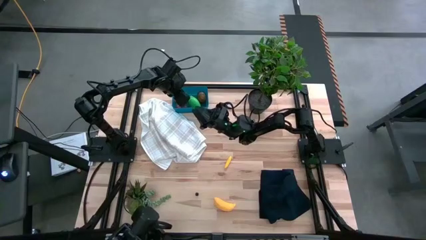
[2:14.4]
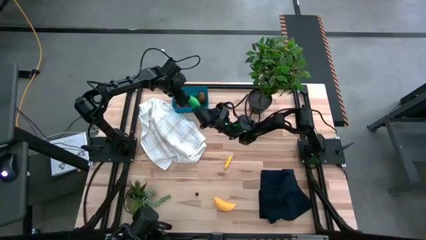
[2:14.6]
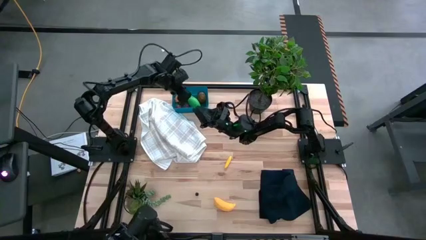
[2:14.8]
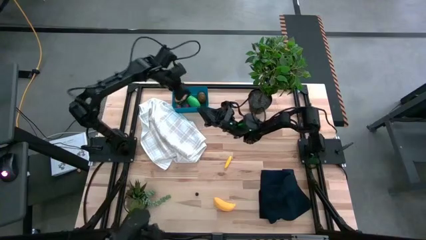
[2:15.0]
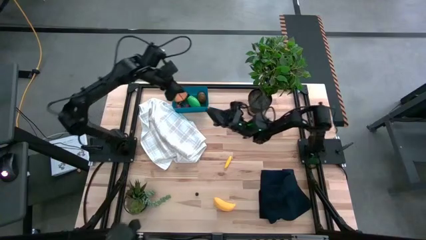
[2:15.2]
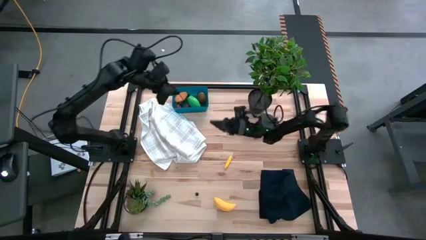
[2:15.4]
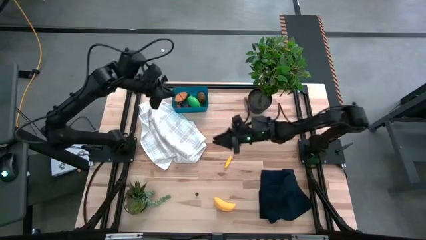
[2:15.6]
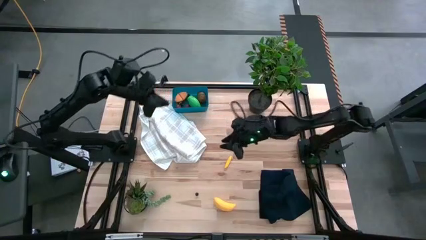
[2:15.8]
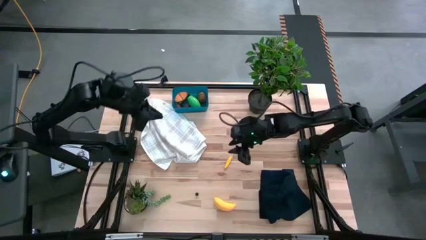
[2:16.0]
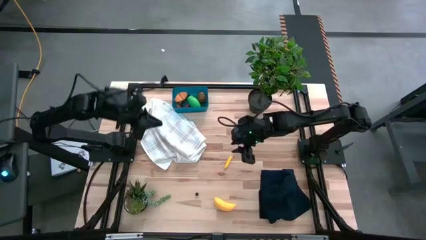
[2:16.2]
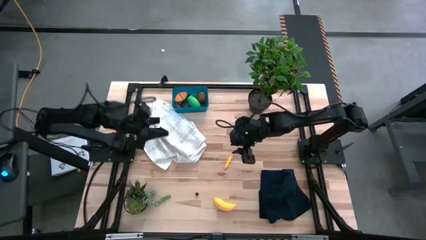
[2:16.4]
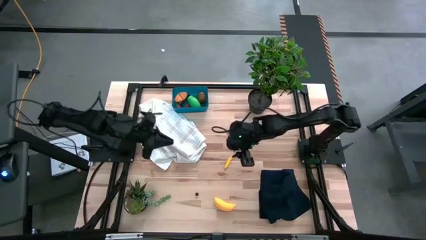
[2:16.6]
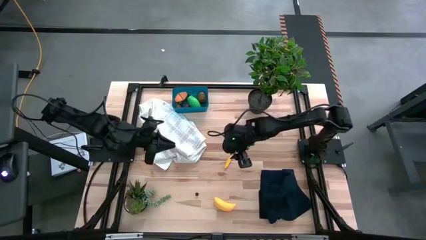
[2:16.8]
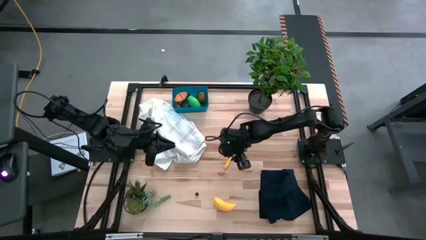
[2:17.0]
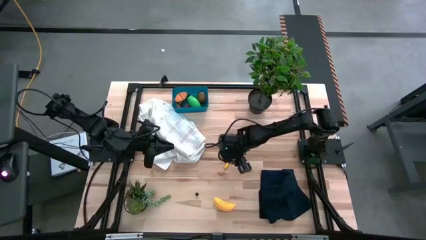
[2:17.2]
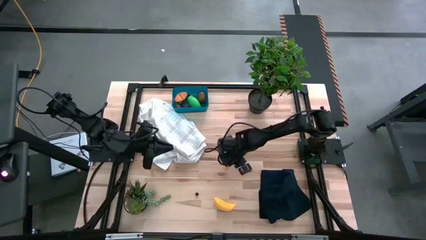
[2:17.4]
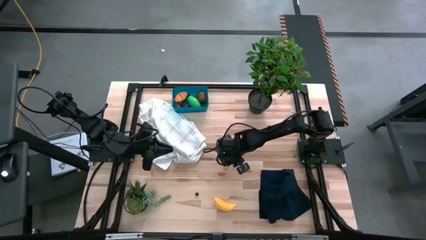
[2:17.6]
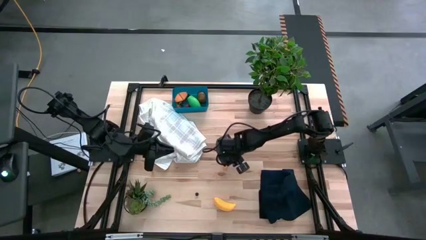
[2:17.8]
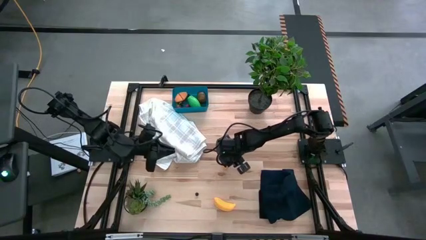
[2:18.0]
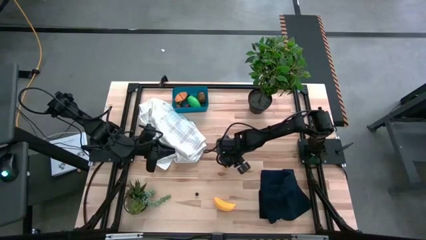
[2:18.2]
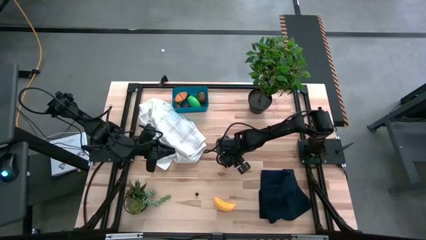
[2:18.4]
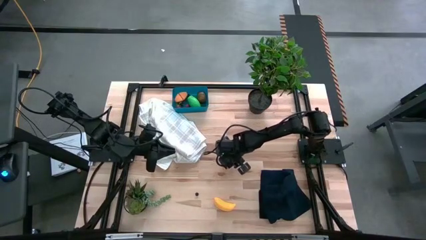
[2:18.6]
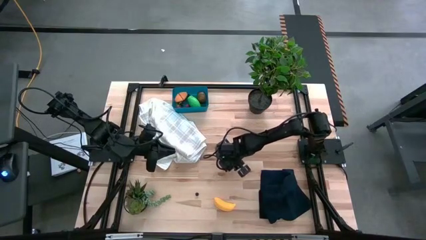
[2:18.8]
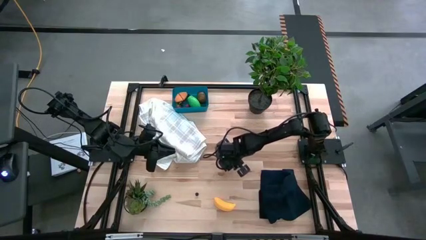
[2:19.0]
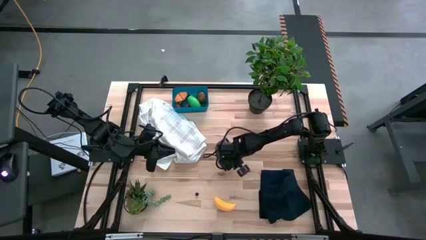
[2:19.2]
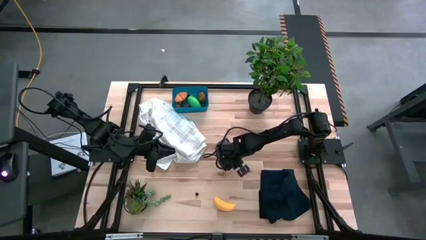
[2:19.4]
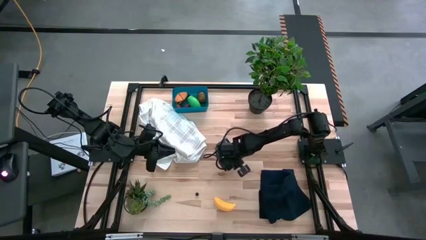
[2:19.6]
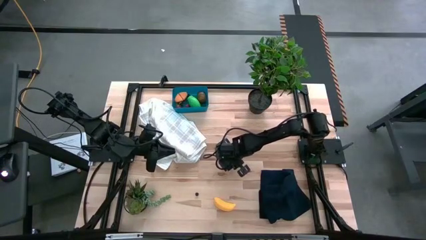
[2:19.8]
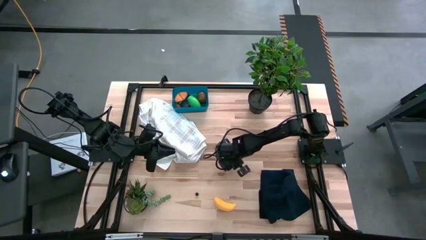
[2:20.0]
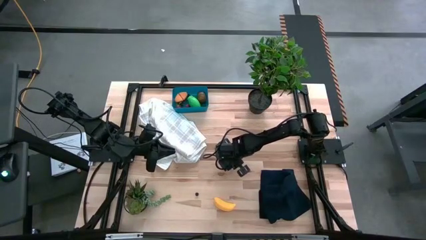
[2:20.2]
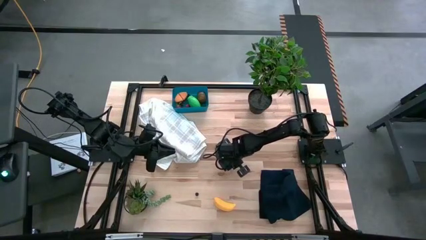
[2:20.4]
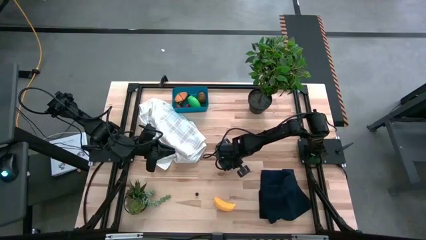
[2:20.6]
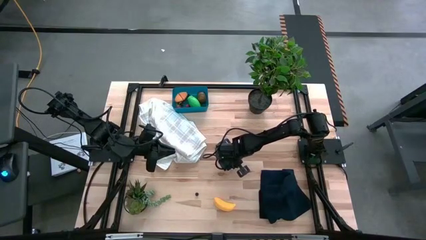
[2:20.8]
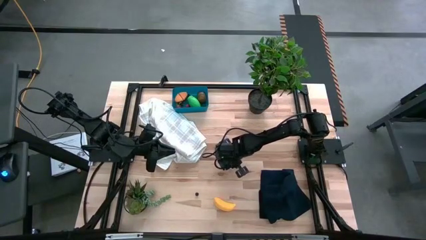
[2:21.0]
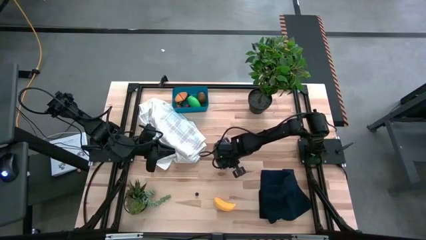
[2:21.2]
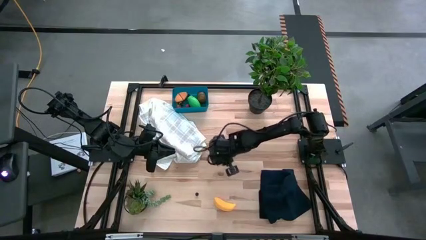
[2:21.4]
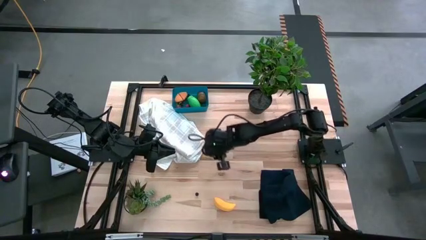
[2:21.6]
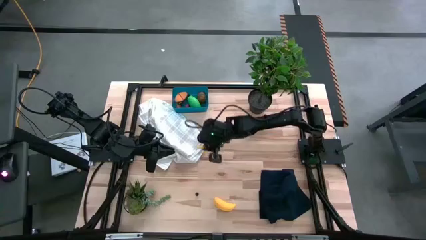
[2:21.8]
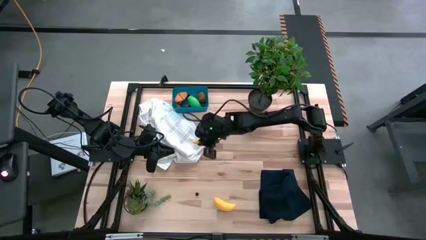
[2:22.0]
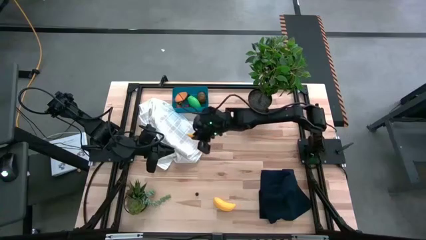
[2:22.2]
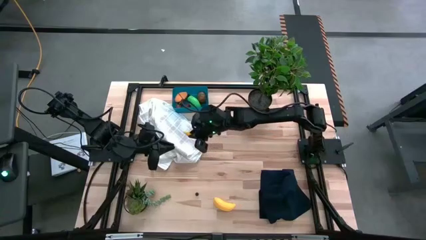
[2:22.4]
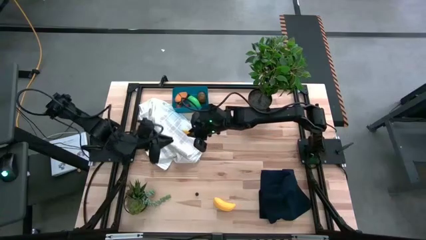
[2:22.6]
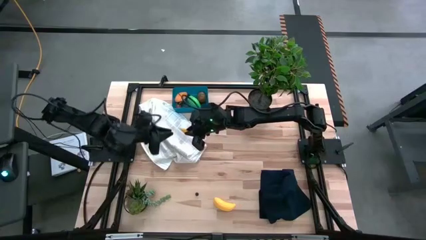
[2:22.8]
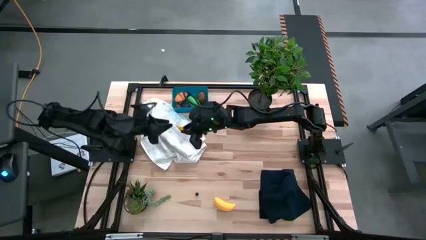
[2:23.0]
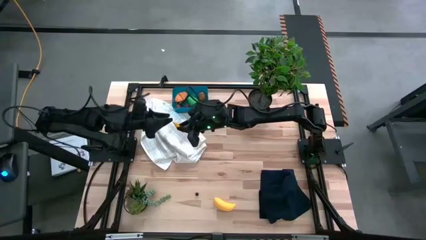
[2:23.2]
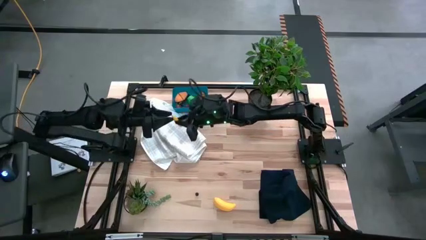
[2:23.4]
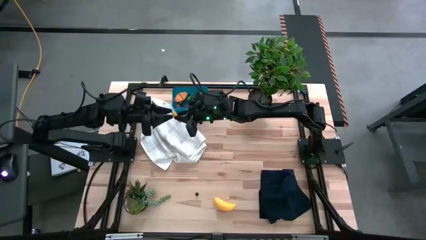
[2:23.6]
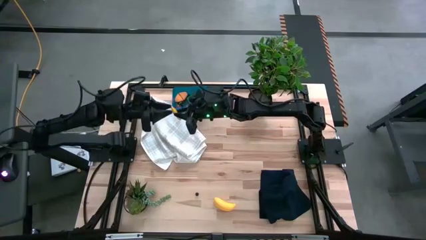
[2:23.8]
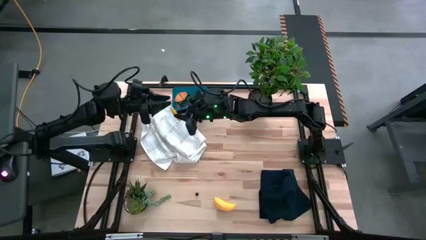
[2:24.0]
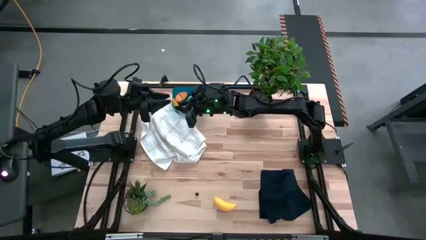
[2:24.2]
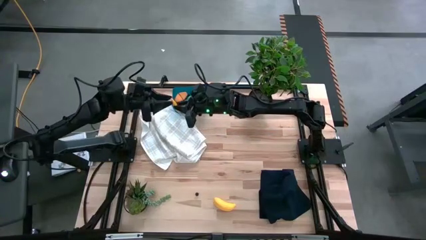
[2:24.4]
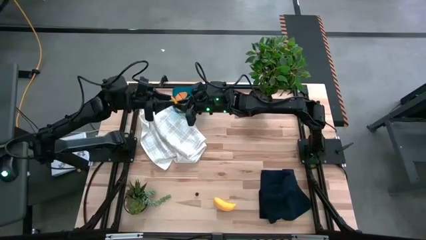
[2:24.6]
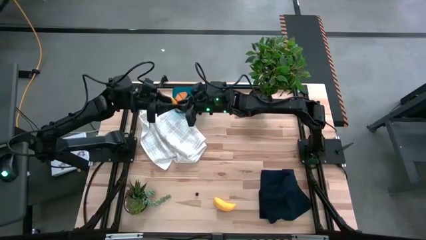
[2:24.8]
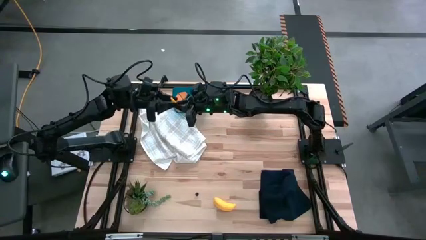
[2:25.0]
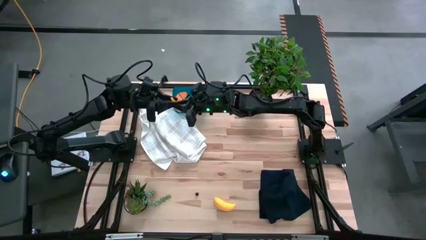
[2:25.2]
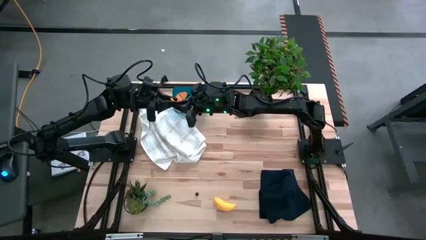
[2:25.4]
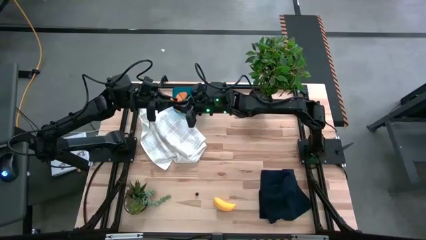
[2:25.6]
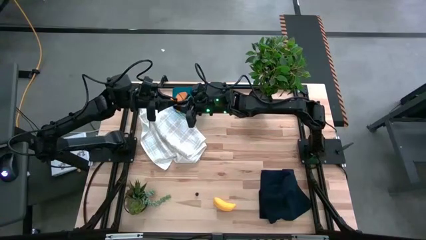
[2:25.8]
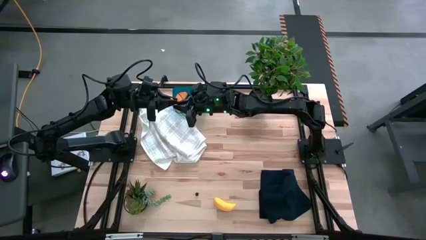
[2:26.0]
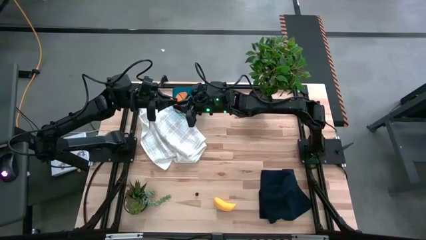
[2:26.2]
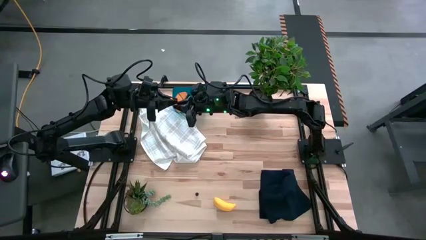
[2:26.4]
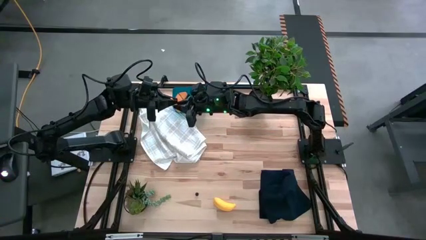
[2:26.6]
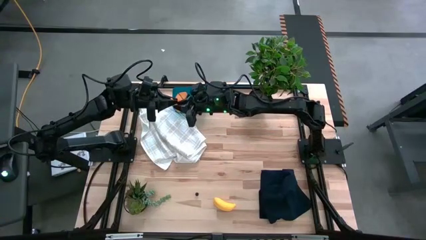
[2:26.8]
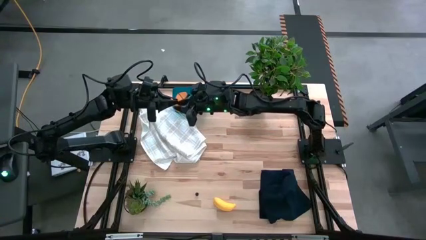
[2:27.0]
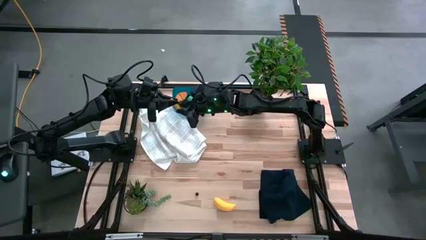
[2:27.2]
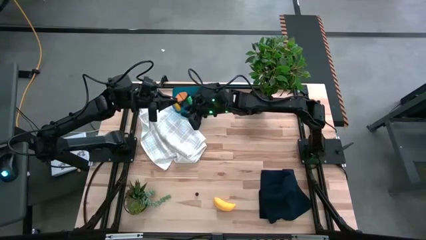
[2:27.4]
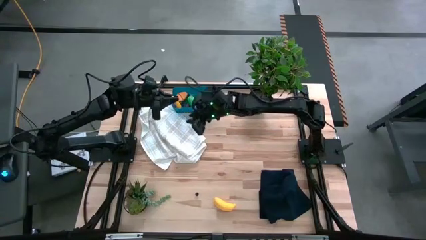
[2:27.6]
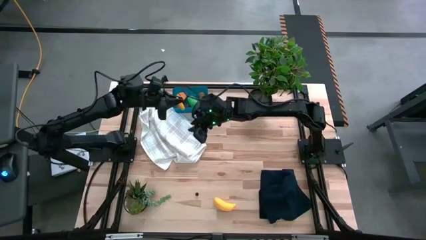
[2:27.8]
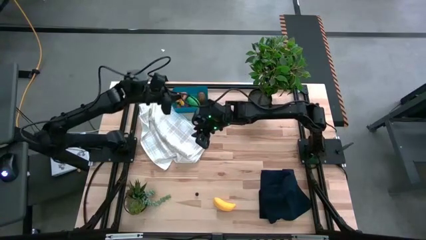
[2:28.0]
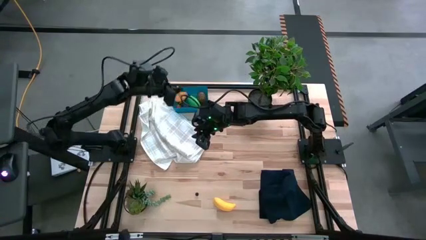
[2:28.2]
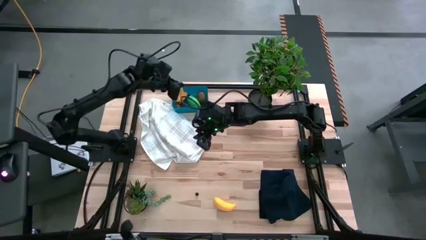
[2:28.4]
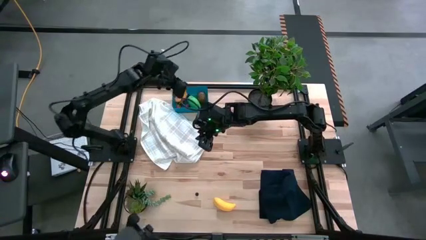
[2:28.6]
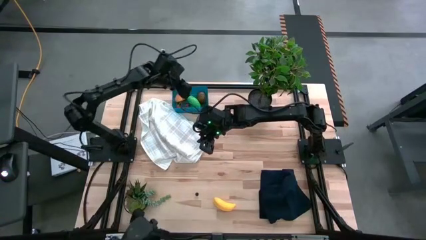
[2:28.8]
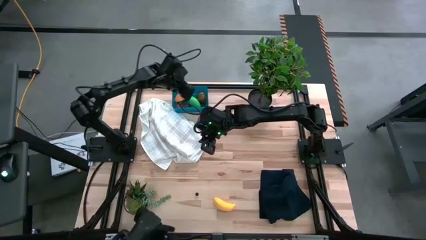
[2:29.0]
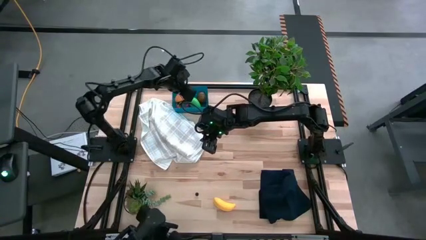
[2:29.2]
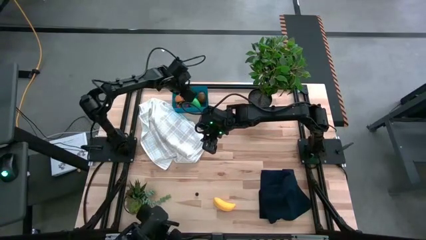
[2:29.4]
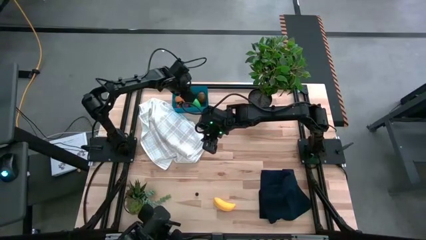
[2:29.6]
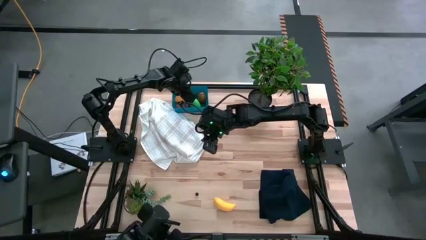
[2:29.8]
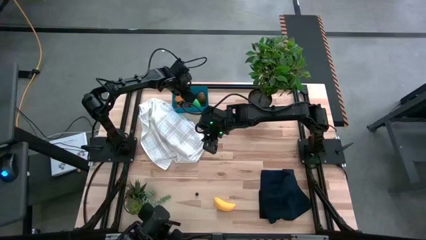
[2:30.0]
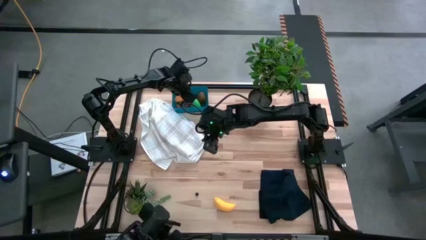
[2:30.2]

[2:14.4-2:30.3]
Task: Pick and placing Produce into tupperware
Put the yellow corn into the blue bin
